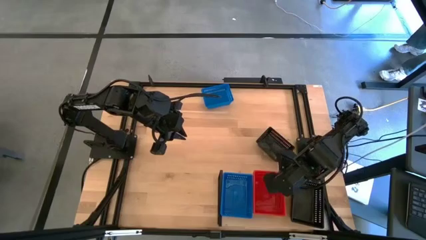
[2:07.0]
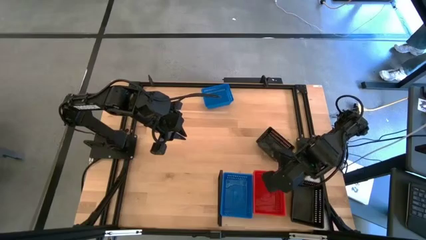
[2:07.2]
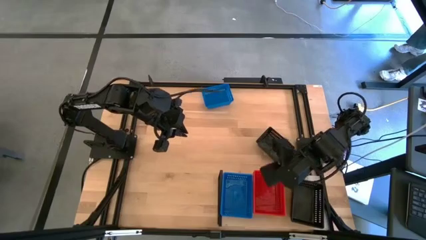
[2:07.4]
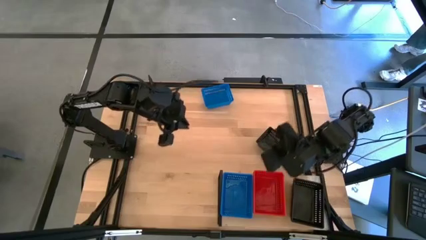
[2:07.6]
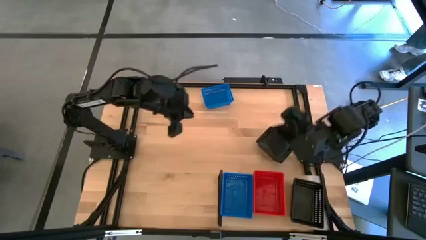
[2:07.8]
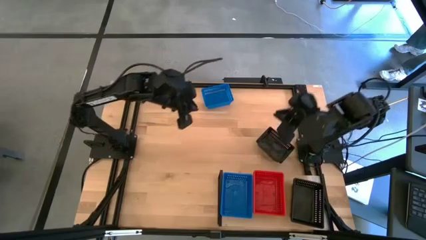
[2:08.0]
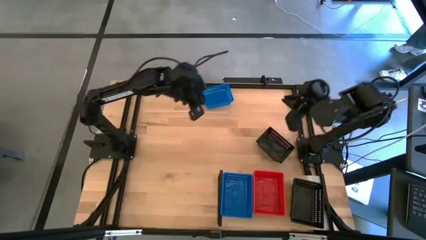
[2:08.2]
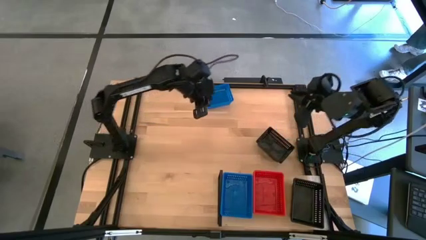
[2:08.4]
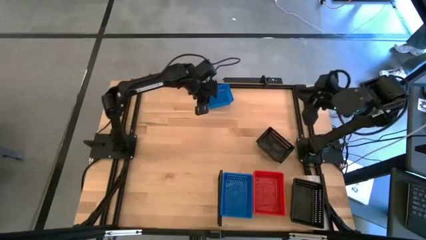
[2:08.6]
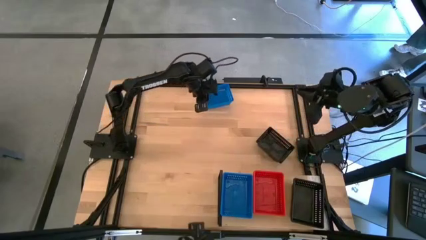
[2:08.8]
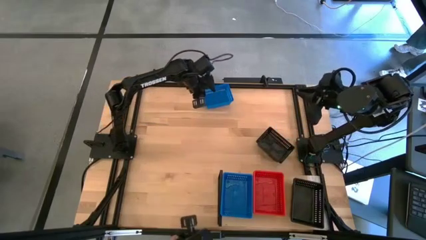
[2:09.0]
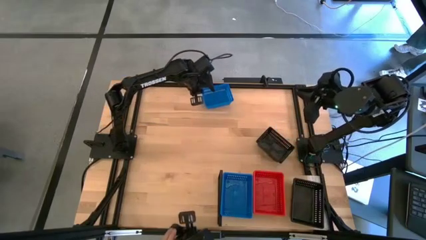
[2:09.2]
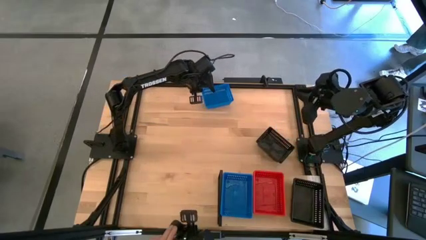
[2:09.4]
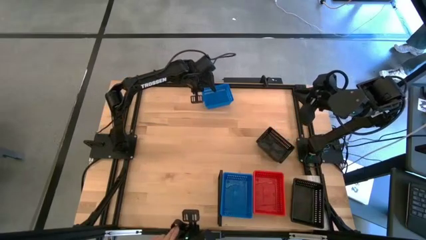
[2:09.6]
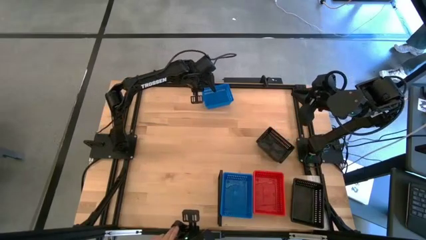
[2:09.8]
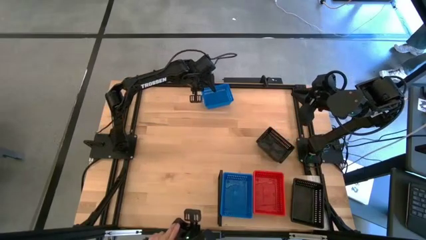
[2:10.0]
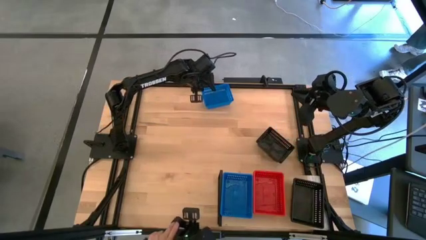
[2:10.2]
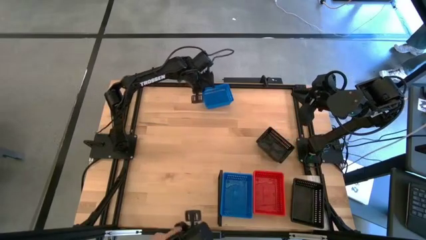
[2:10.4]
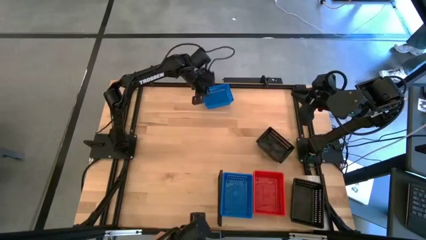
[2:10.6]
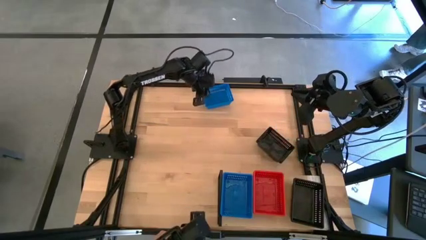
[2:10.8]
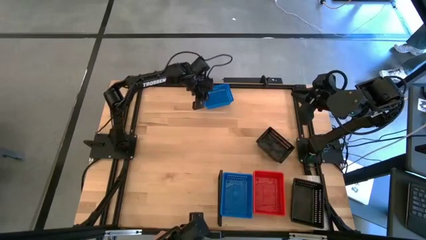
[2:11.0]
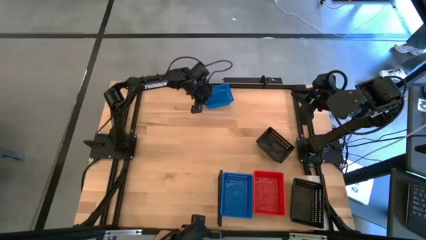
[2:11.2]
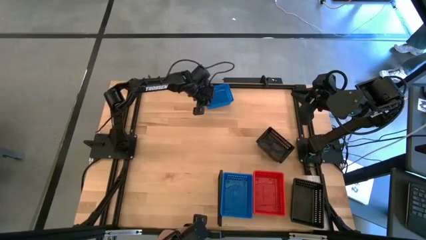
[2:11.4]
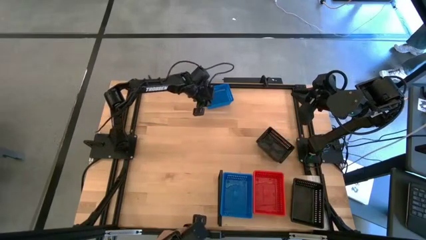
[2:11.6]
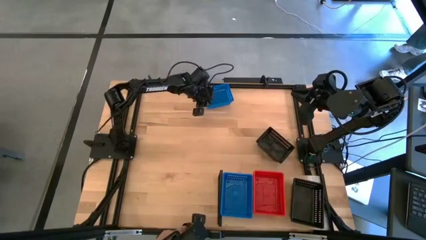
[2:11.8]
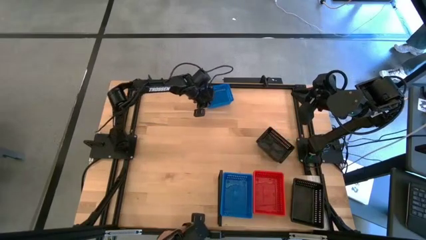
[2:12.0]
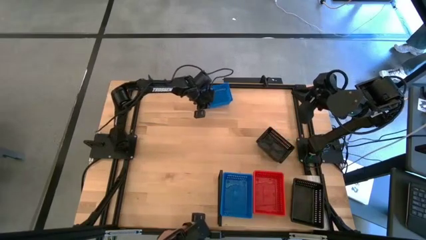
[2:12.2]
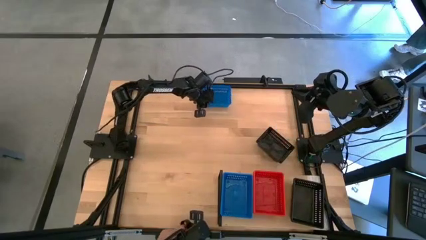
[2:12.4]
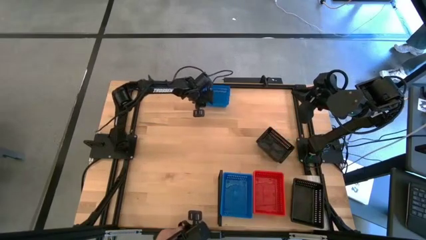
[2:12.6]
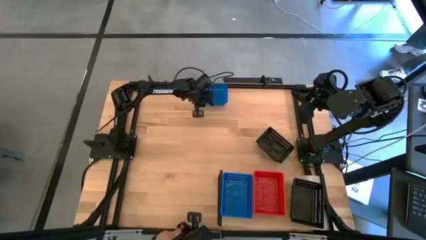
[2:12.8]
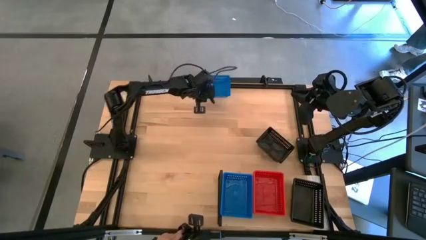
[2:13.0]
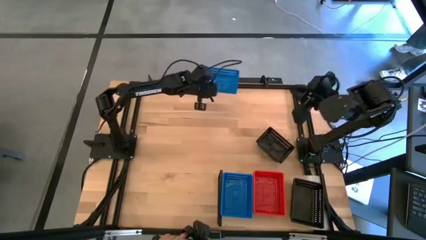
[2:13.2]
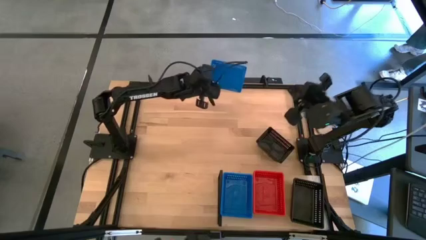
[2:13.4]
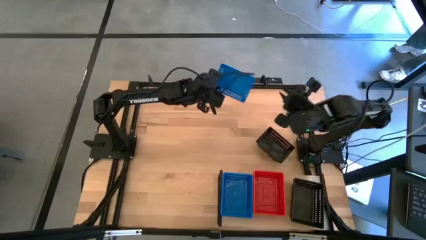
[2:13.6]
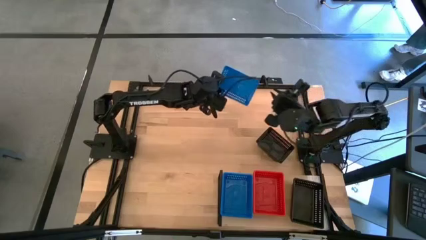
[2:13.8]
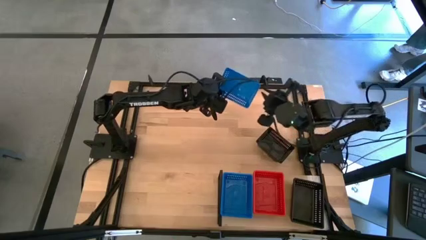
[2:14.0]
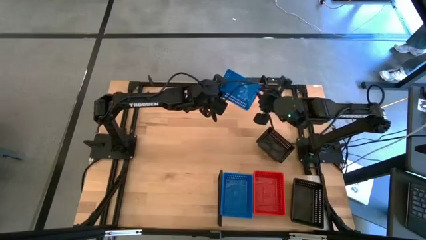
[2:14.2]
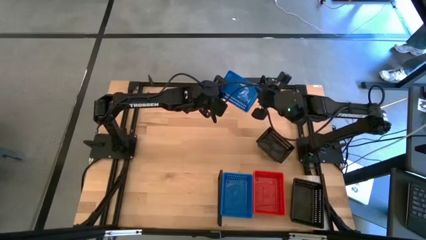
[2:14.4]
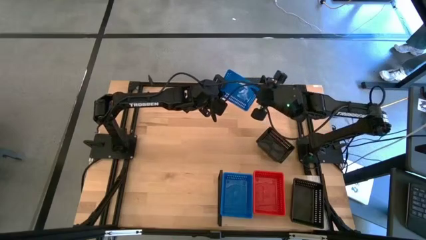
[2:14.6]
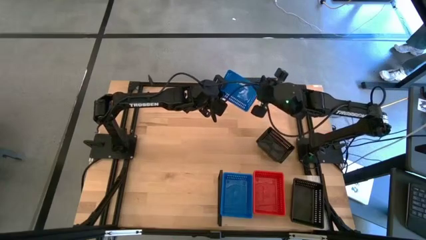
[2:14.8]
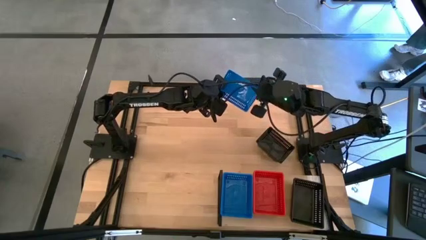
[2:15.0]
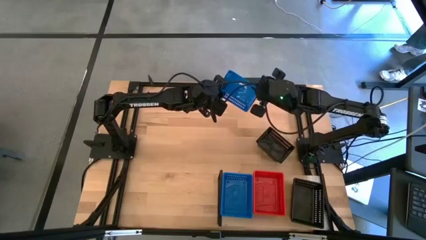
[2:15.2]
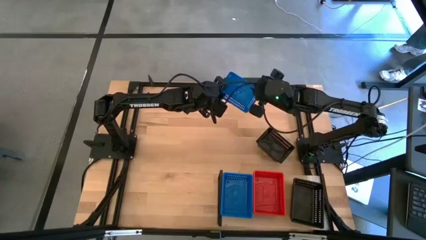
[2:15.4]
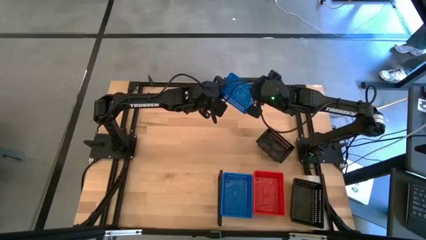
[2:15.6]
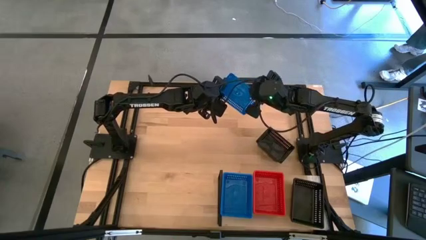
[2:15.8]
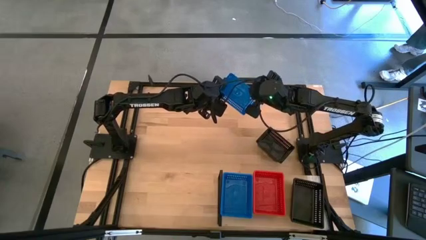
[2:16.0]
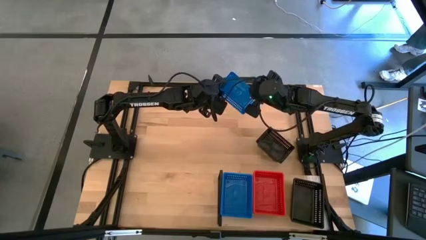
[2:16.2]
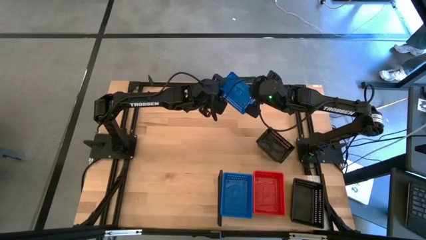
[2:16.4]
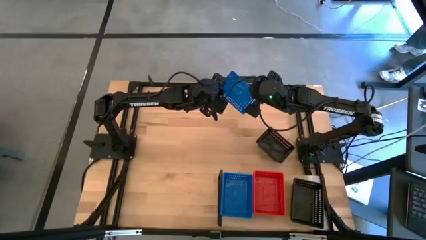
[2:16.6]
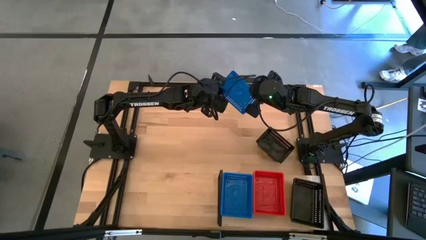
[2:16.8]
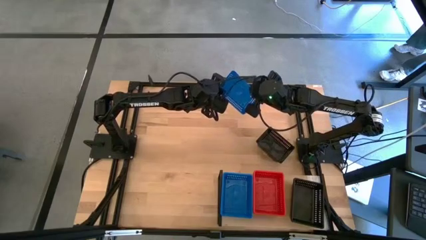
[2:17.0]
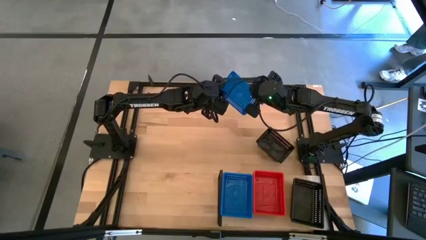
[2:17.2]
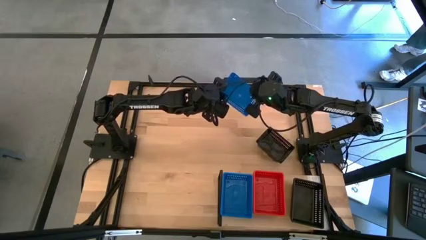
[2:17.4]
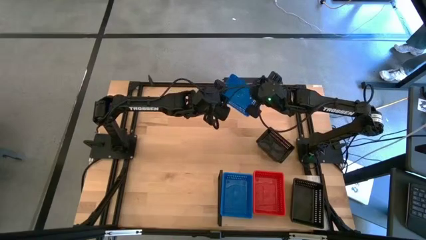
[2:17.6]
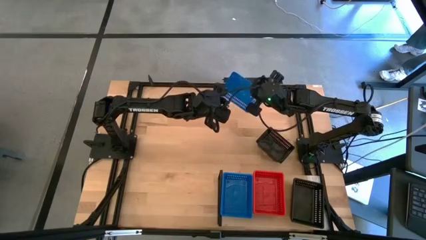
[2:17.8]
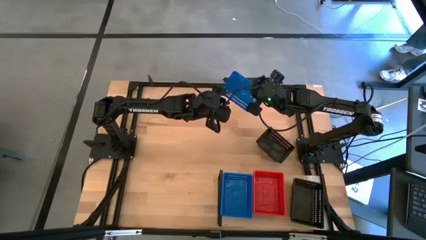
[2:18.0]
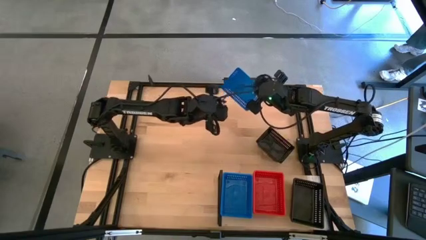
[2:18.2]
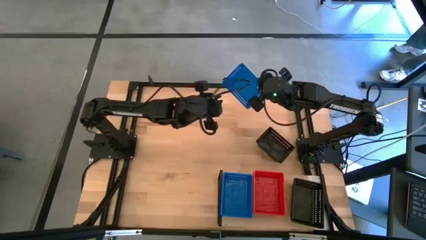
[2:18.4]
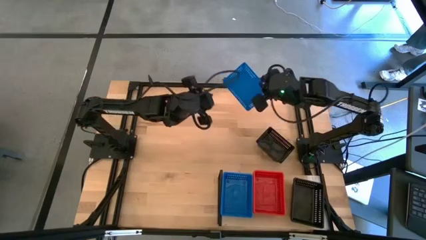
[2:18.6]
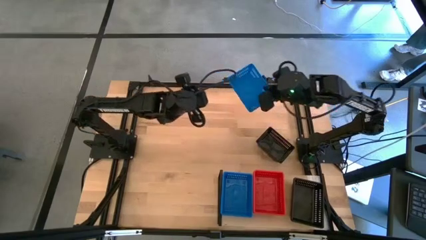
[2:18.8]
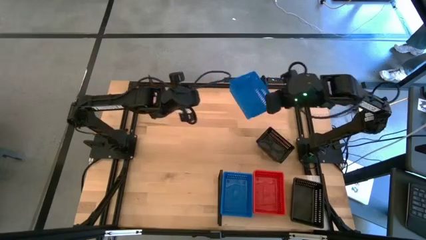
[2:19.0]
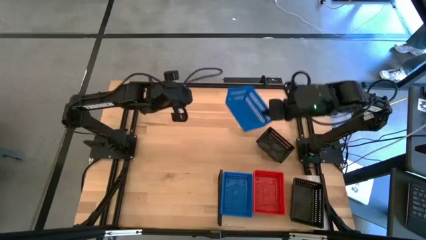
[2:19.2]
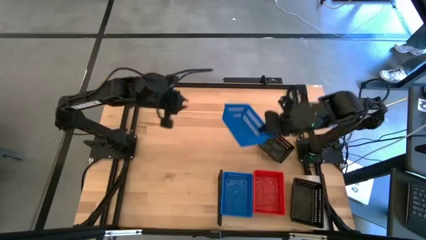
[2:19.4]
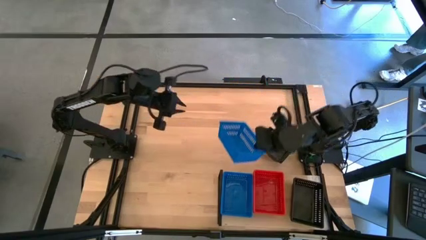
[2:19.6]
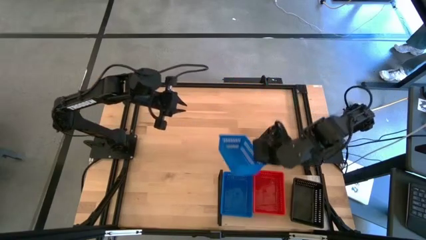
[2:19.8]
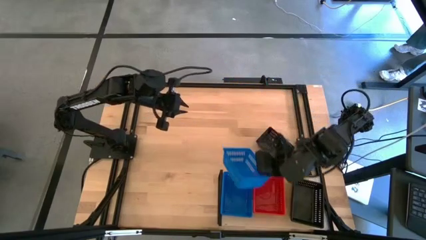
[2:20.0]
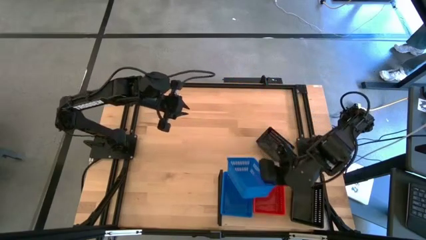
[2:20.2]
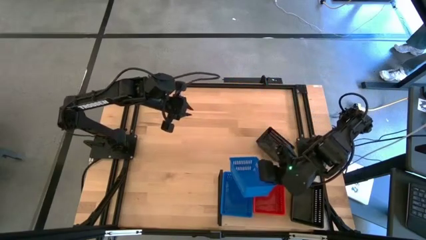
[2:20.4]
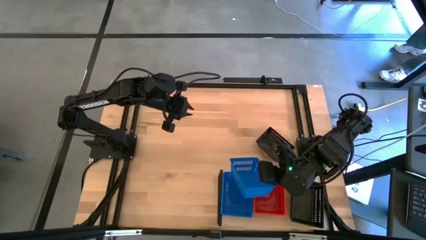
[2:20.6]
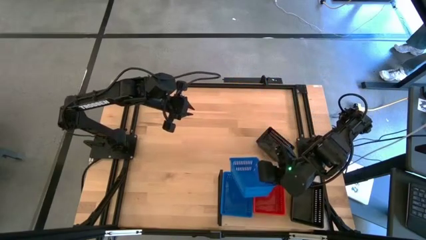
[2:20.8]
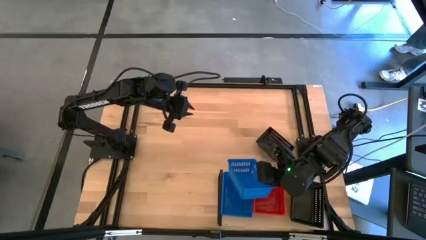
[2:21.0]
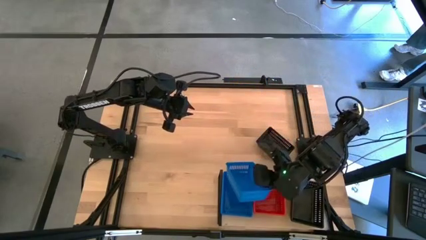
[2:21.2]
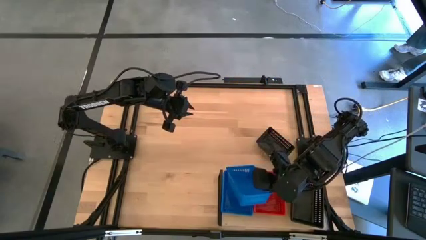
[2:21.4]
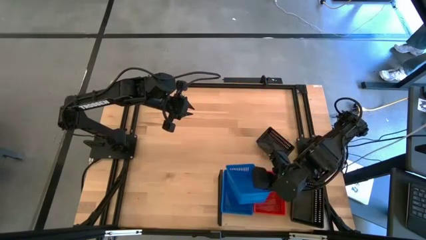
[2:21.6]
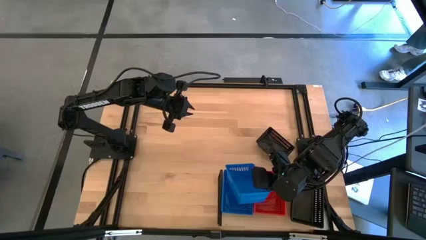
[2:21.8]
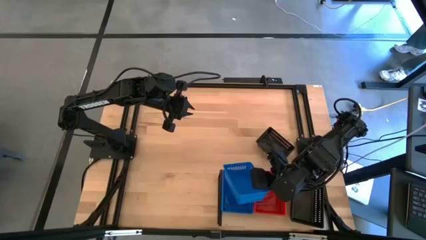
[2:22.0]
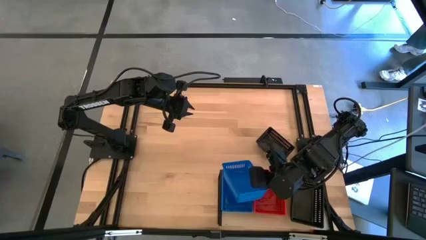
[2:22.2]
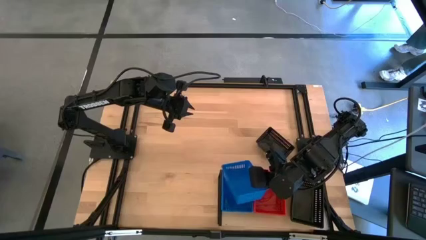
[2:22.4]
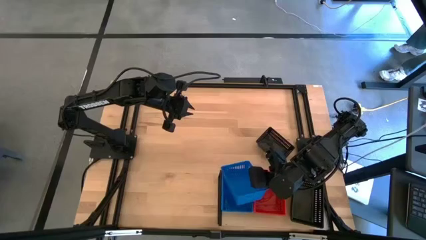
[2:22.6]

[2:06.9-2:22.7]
Task: Stack baskets on shelf by color
Stack the blue bin on top of the blue bins on the shelf

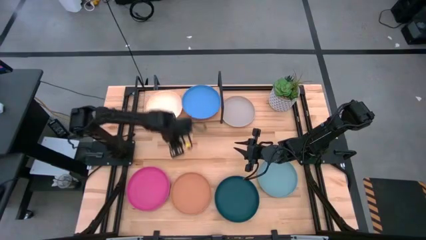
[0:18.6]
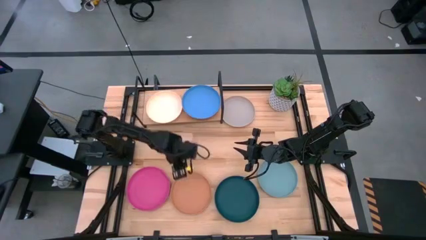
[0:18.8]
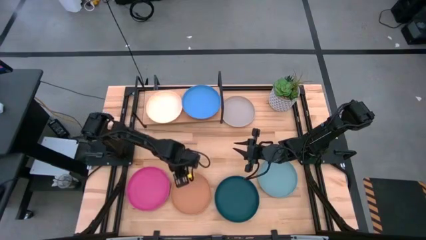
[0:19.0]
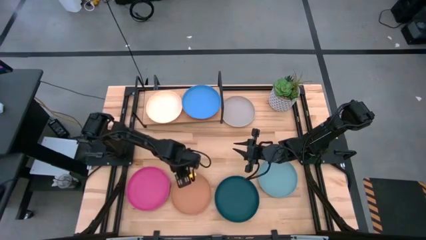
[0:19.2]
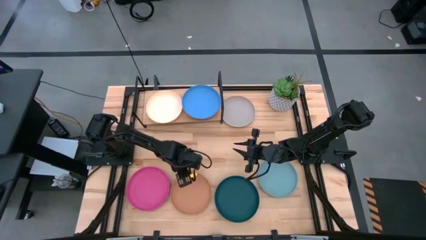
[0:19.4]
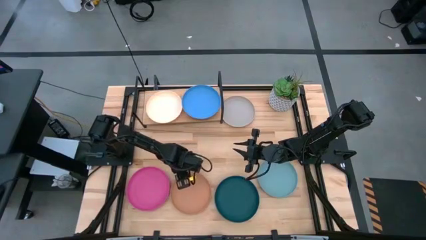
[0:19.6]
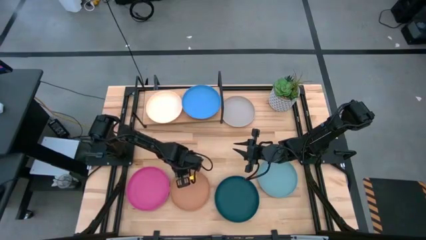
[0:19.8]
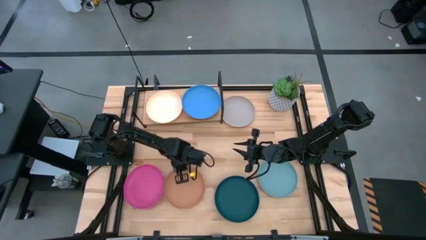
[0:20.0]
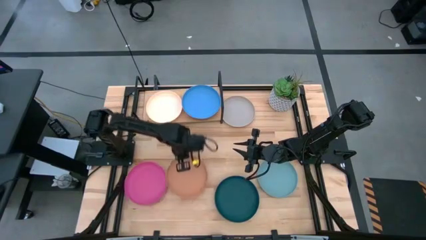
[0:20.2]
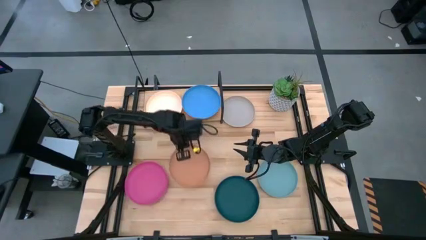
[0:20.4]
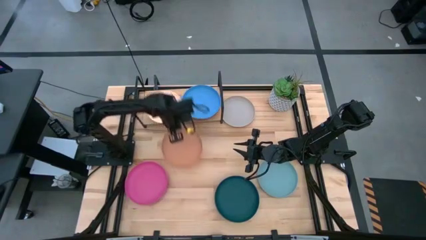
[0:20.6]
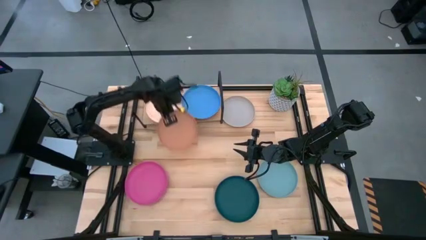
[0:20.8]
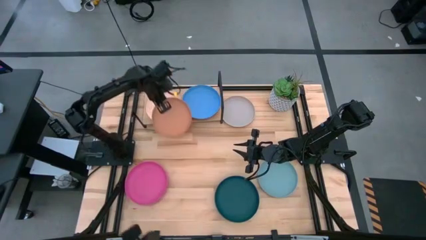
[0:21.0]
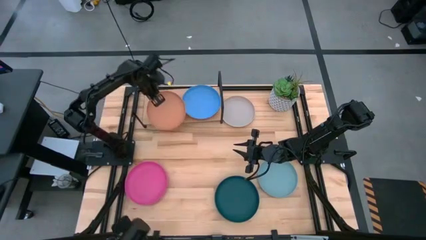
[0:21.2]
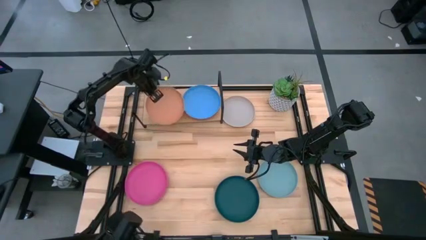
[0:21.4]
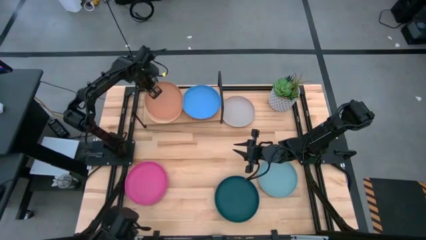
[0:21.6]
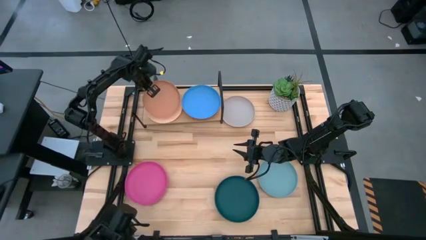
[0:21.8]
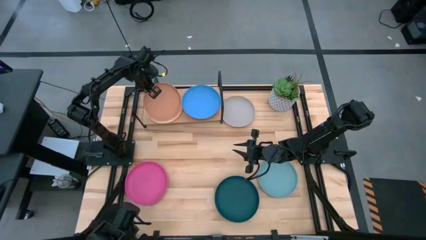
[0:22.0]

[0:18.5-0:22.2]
Task: Place and stack plates onto a shelf
Stack the brown plate on top of the white plate
